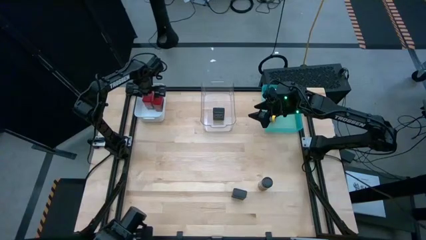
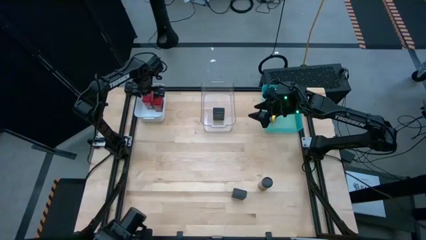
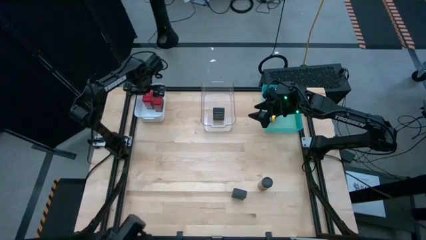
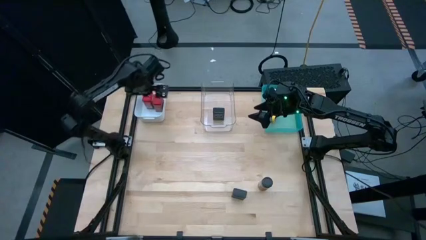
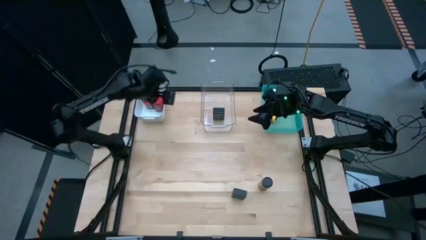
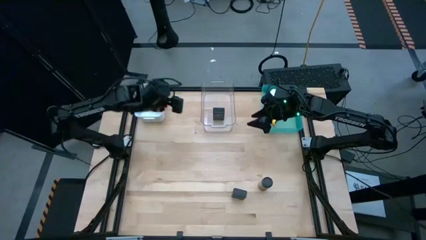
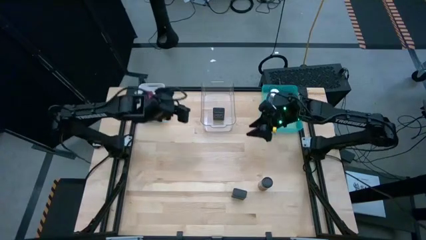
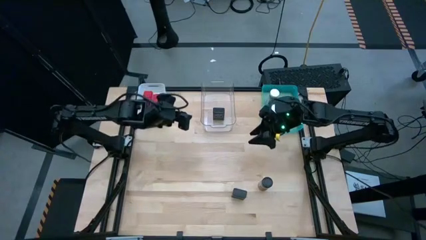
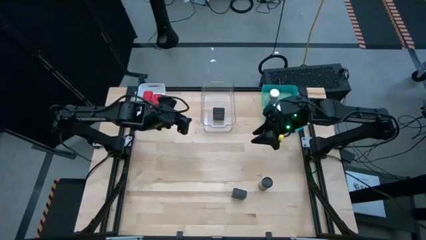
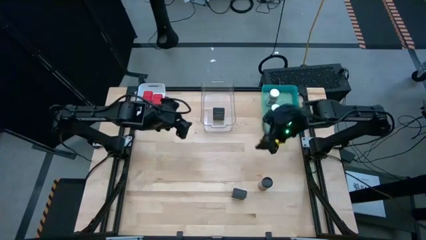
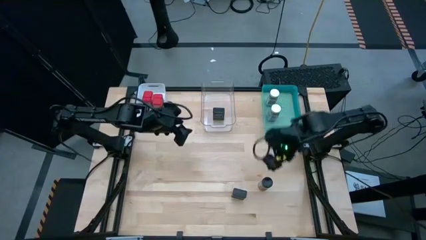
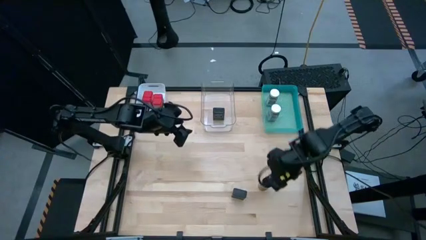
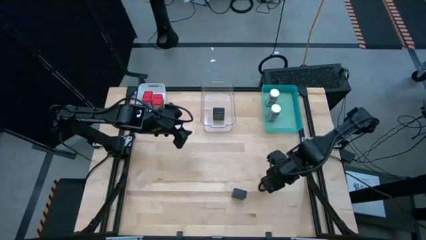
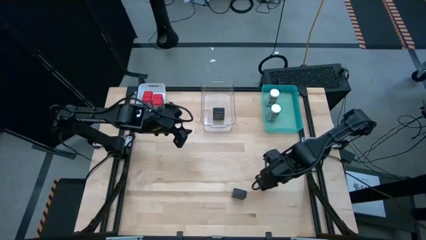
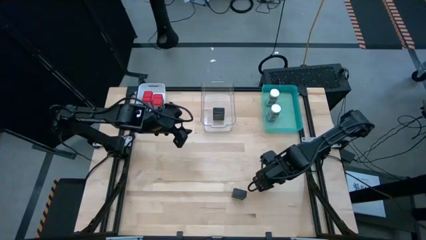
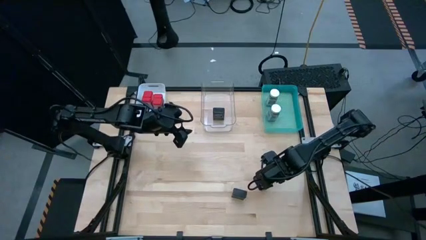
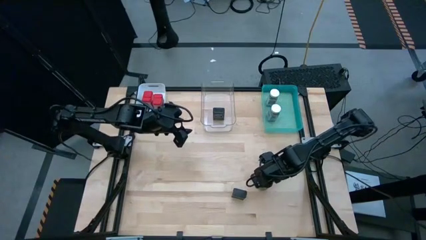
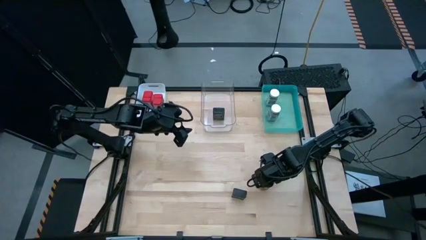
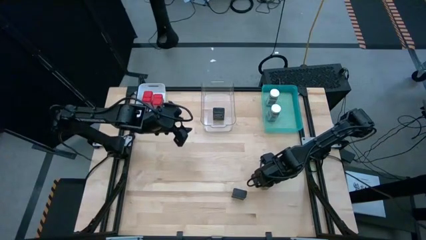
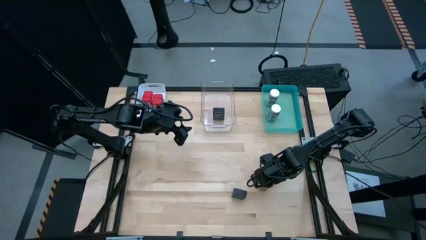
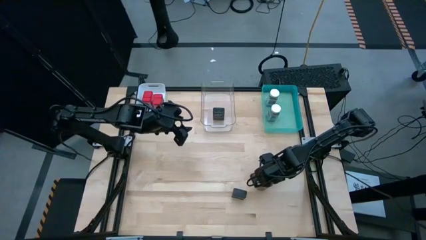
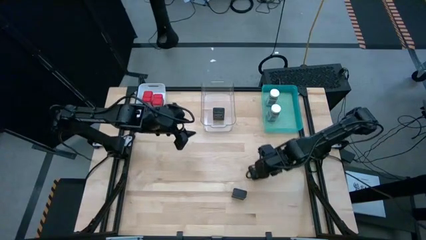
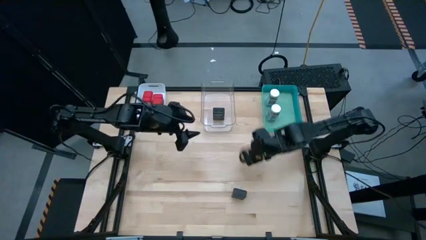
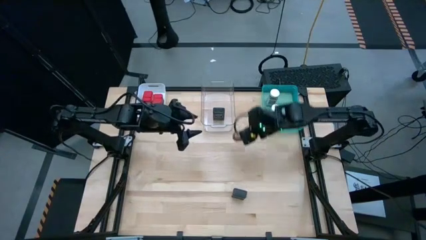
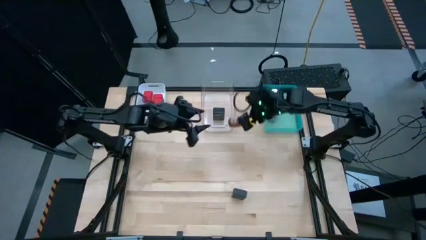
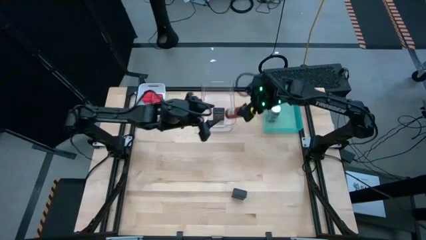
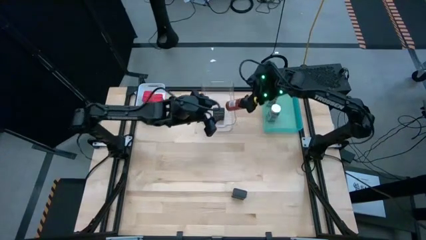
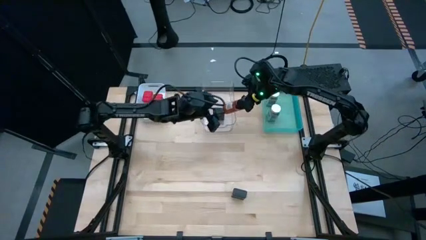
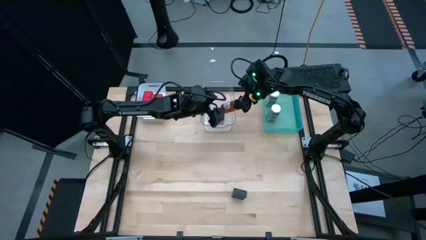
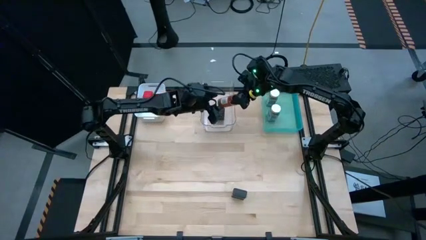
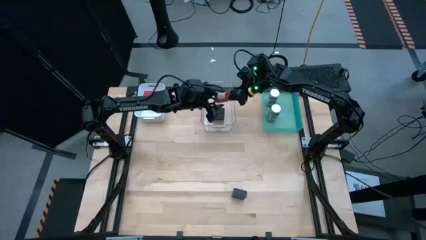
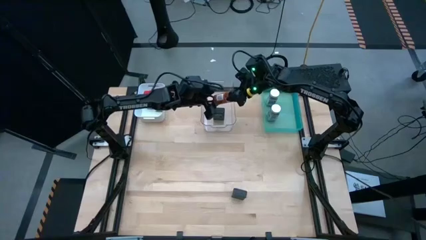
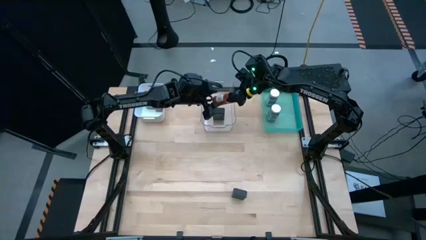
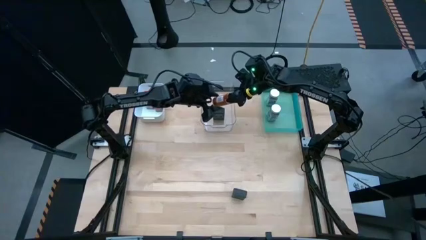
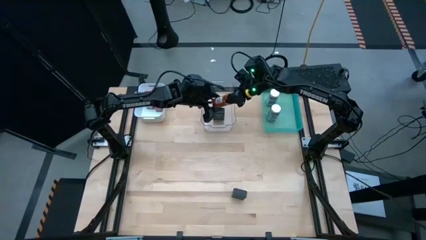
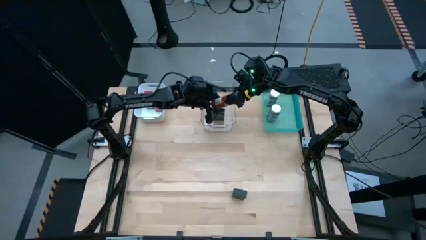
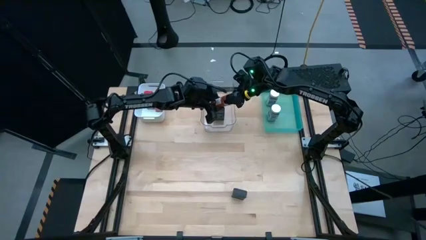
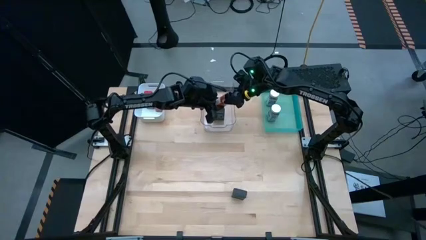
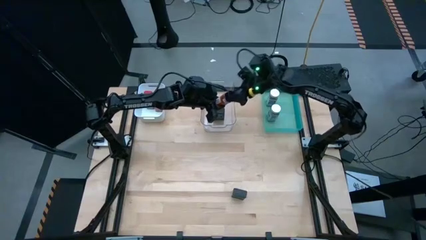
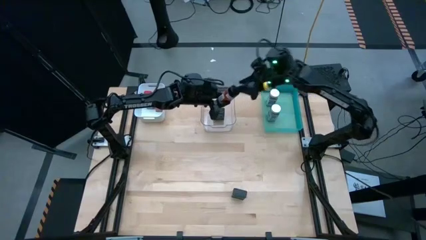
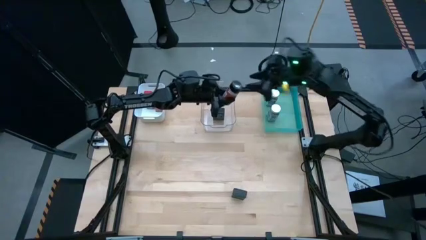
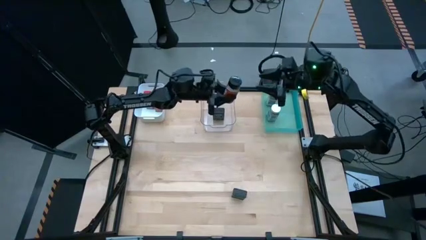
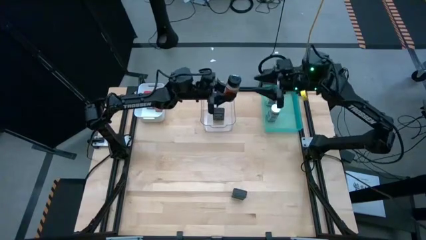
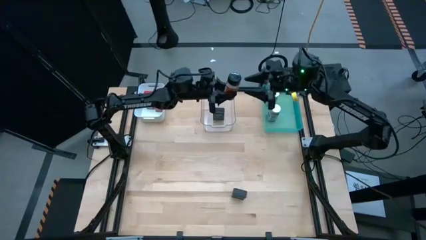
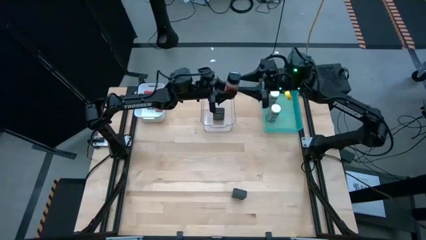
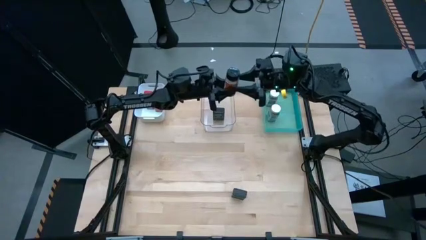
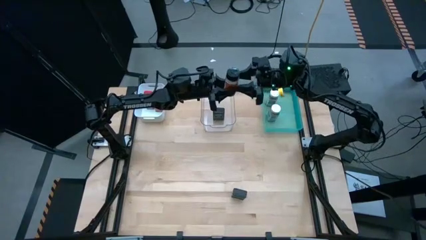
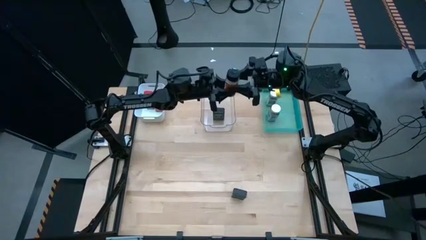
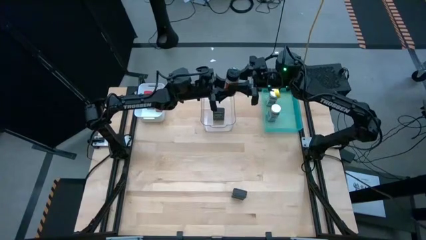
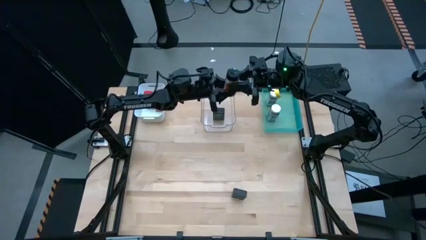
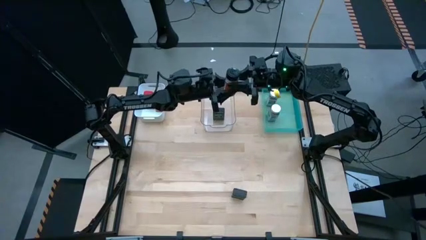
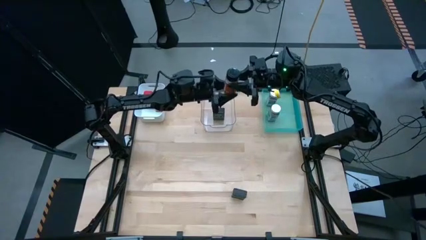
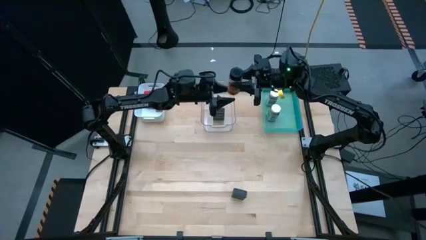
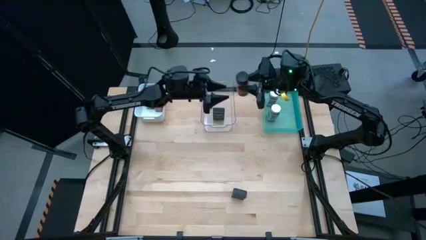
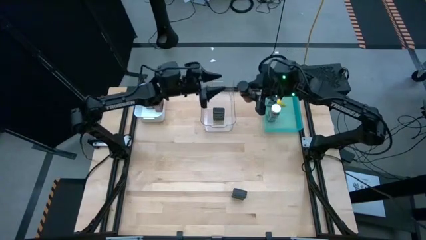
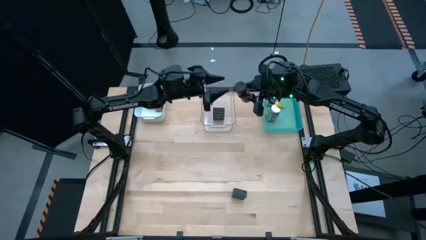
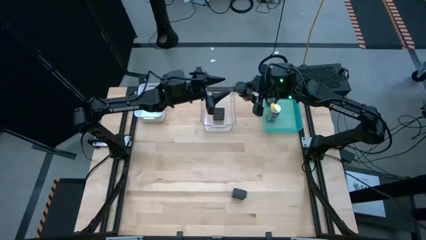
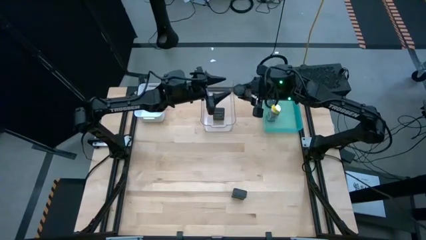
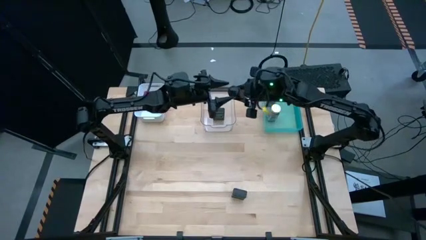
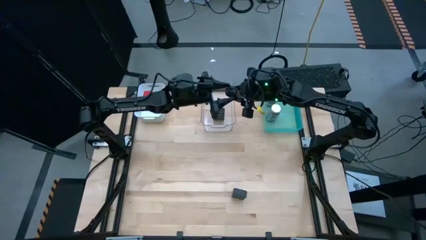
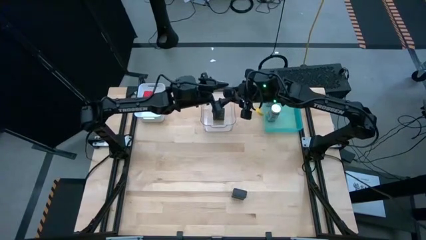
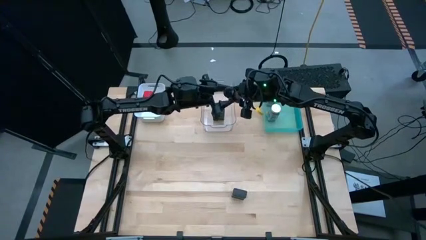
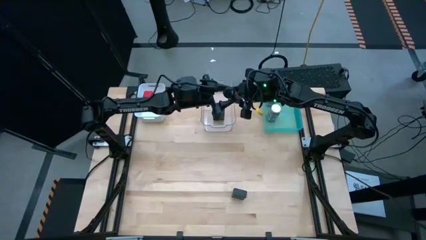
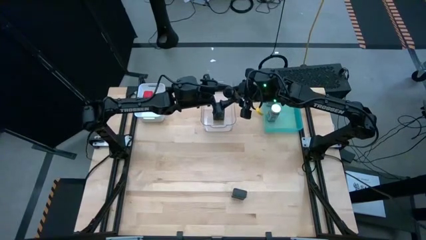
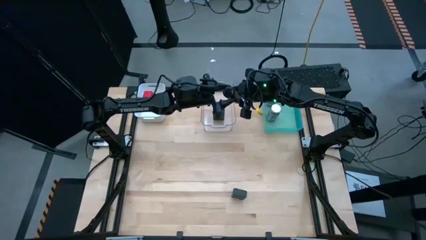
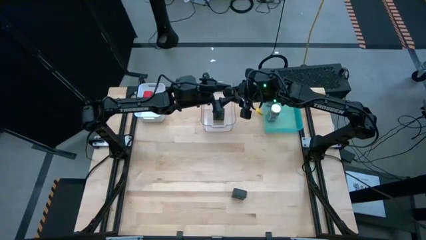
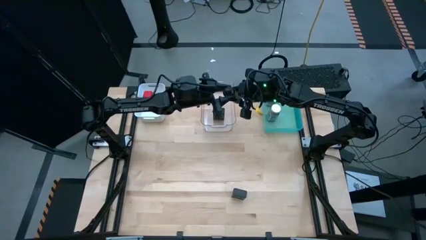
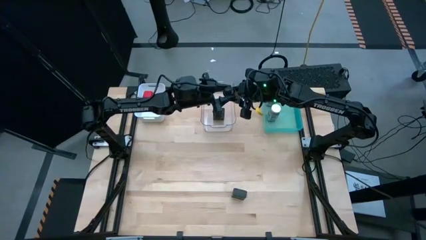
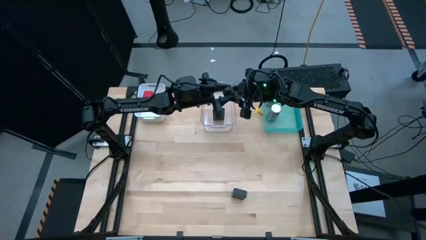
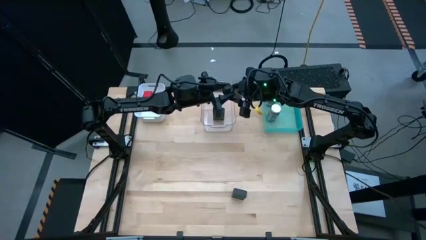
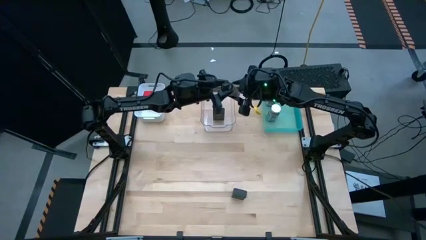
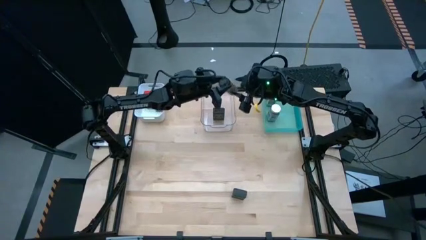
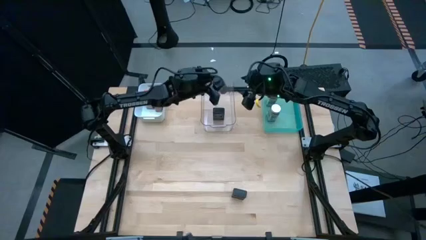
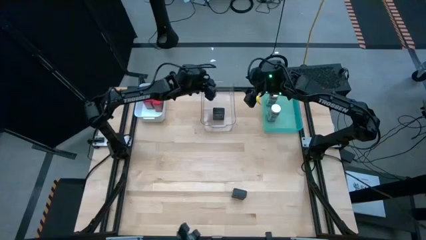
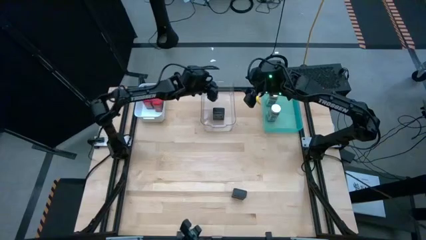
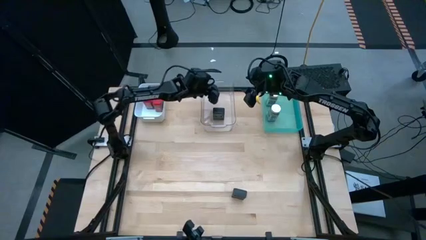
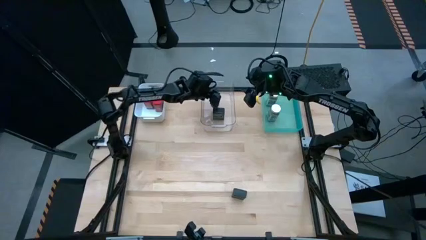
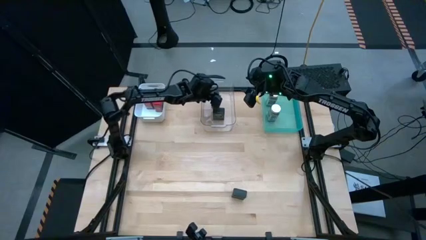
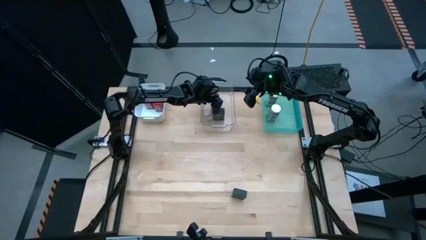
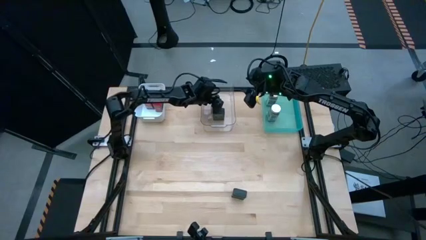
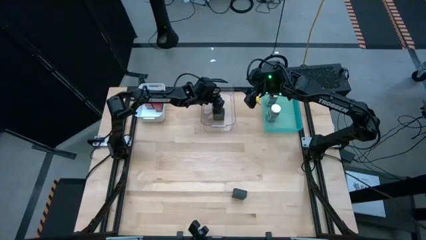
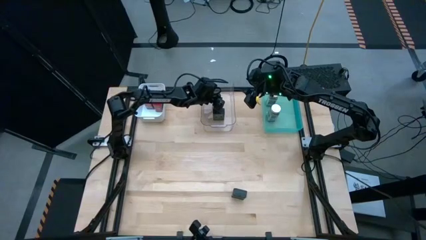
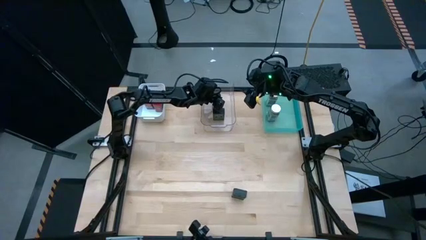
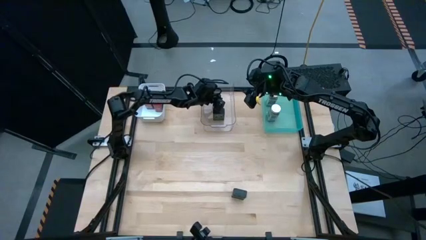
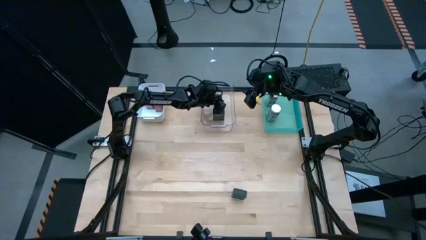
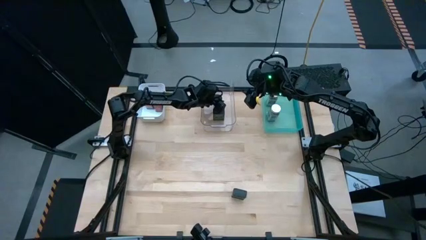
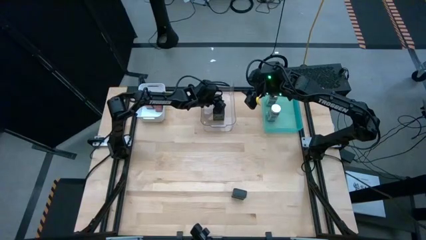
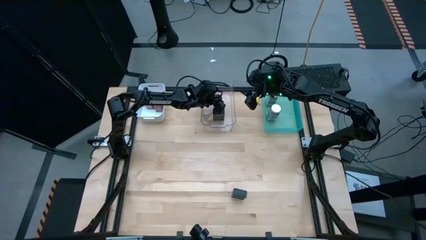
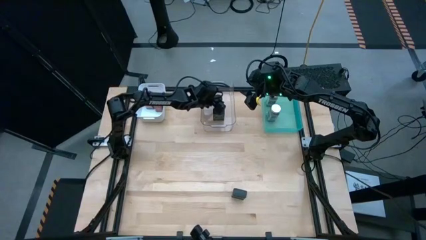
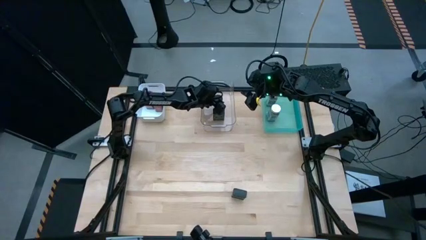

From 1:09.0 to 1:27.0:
Task: Sort spices by type
Put the right black seasoning bottle into the transparent bin
